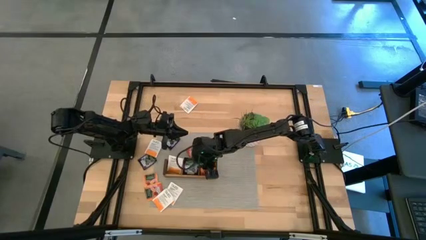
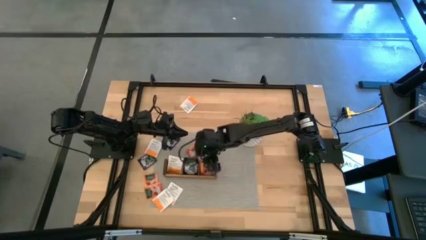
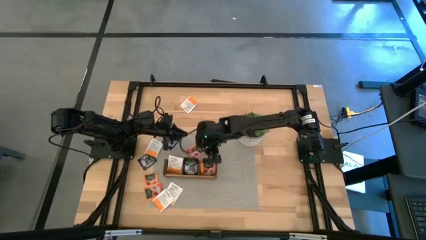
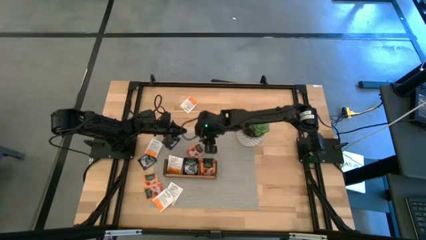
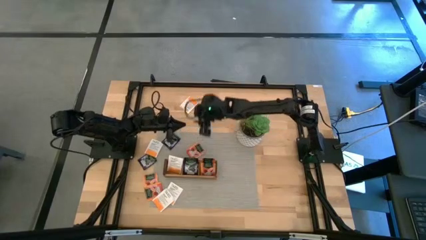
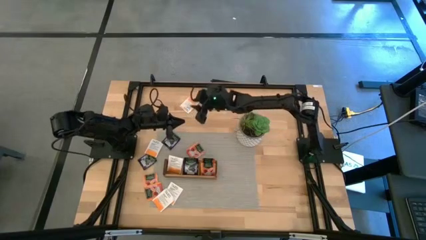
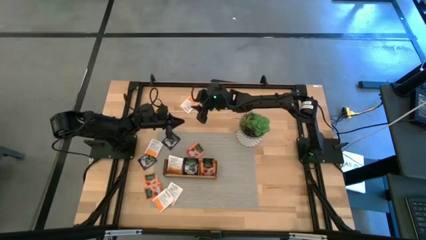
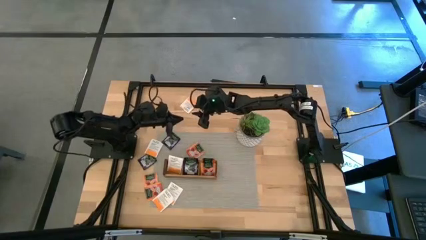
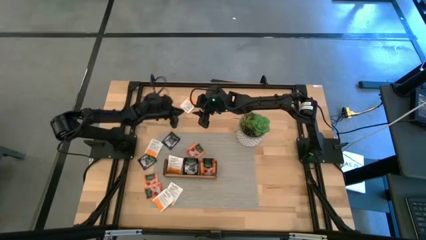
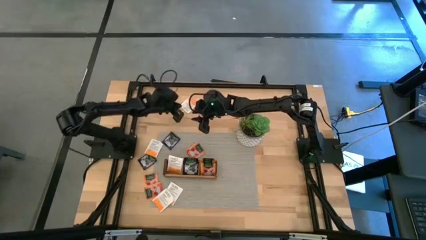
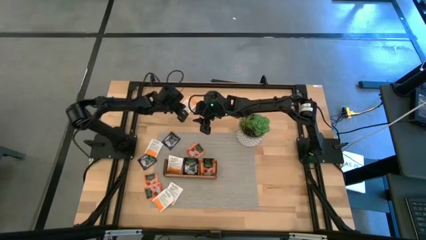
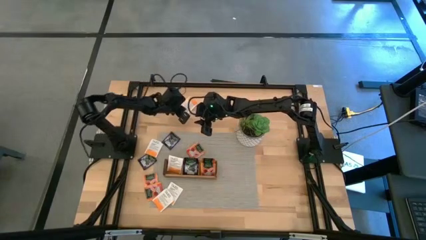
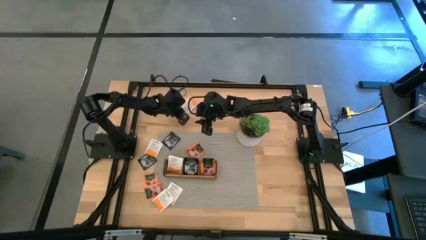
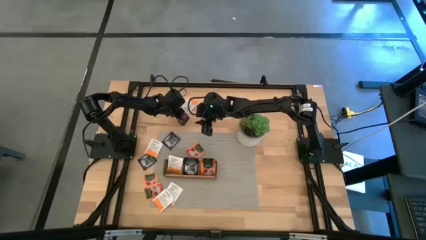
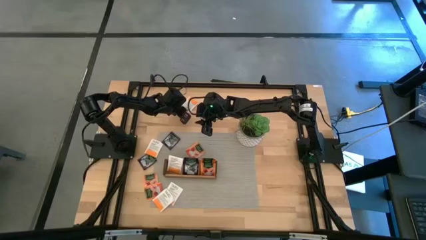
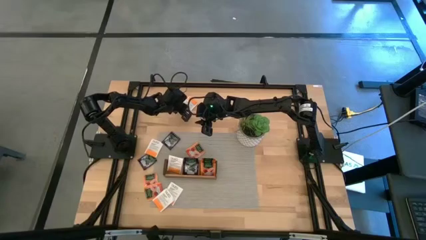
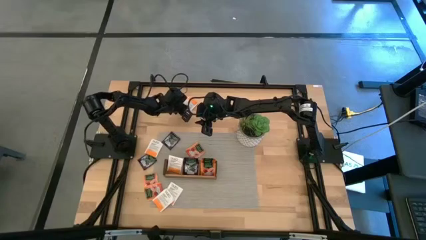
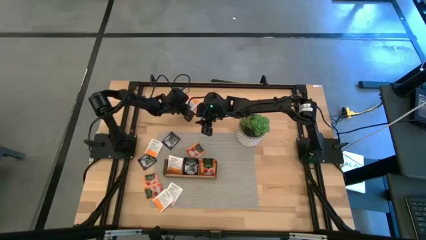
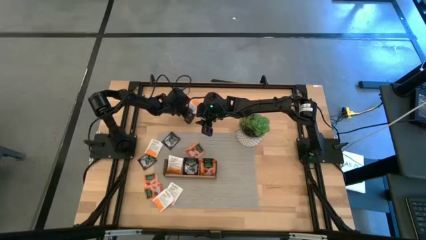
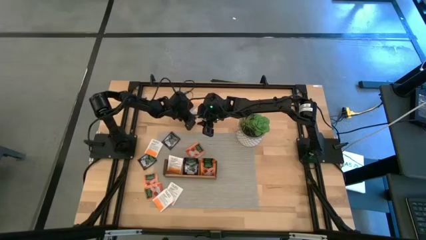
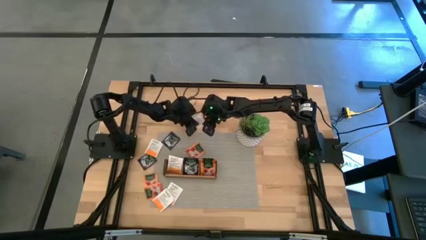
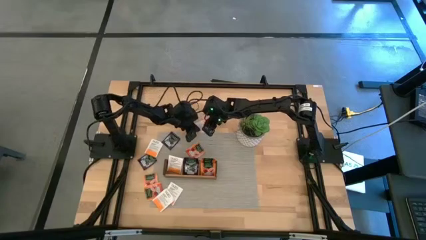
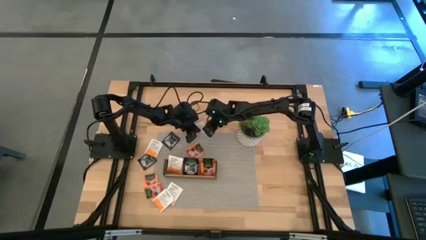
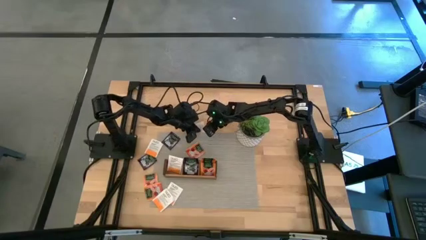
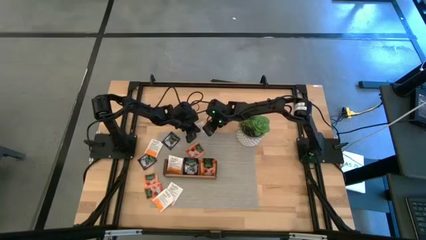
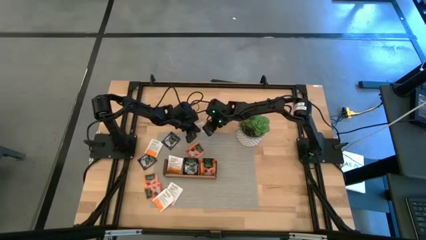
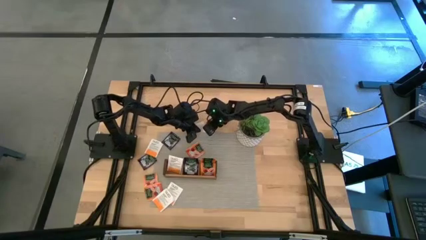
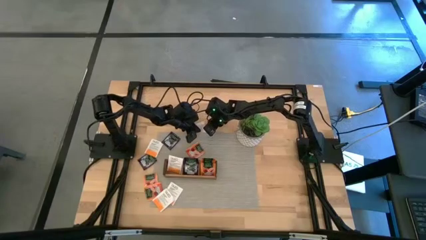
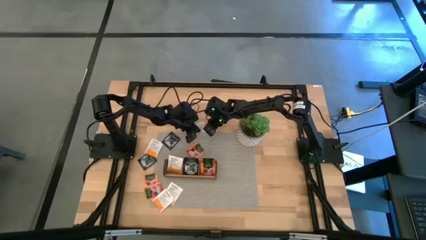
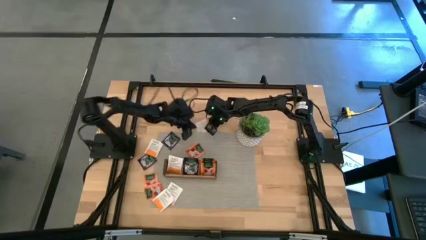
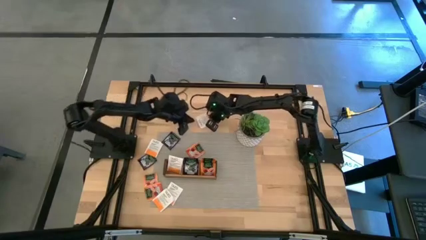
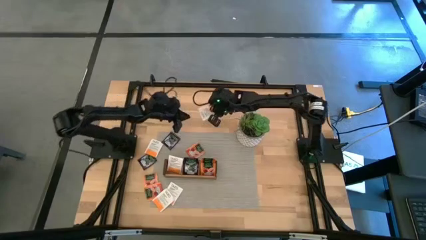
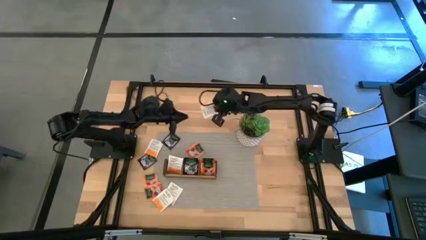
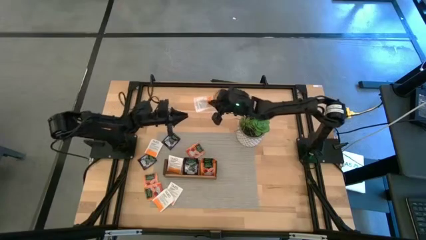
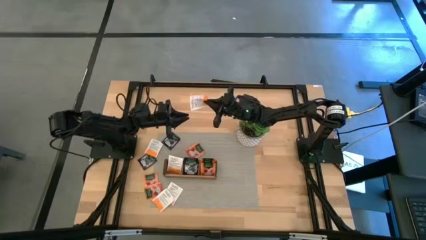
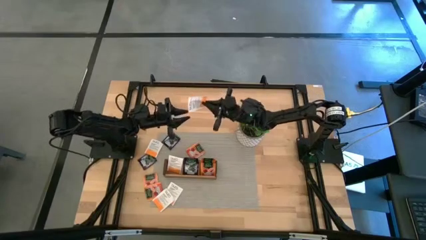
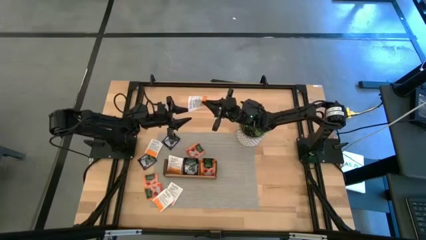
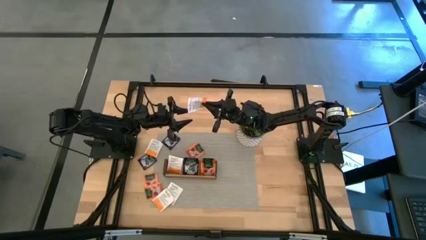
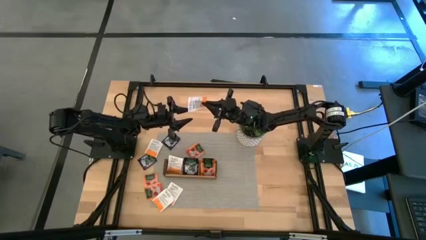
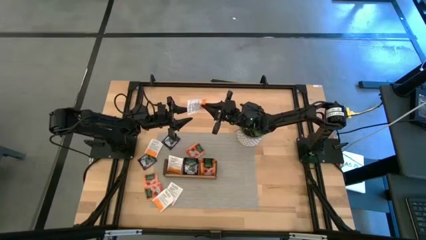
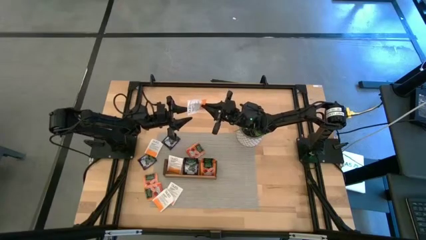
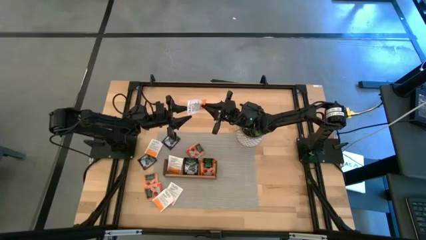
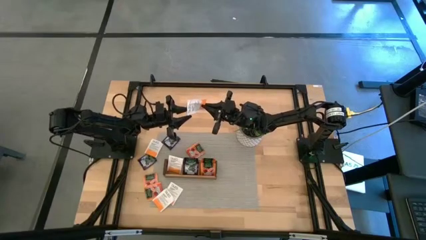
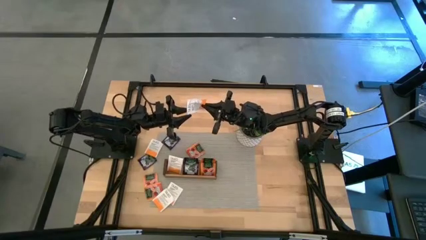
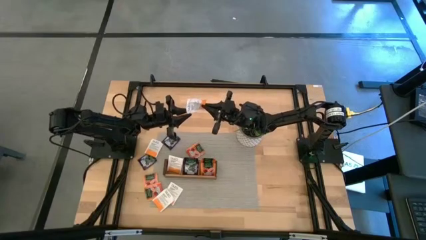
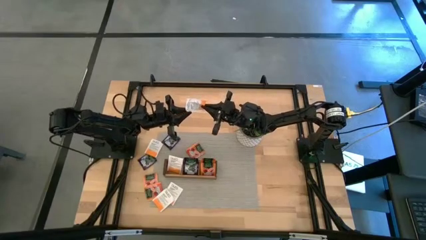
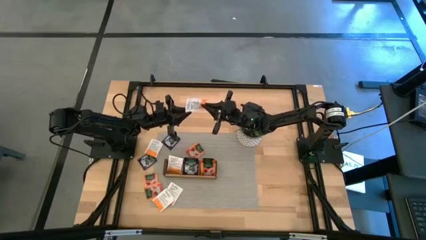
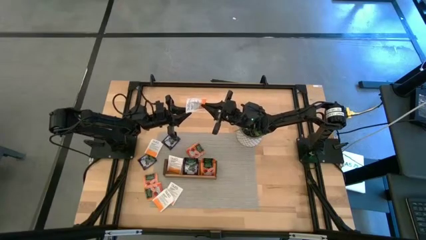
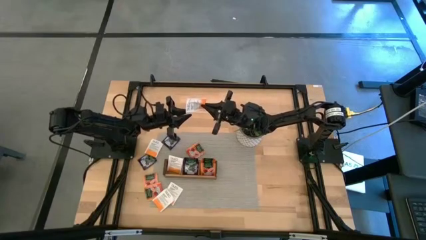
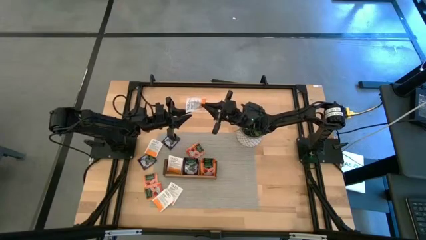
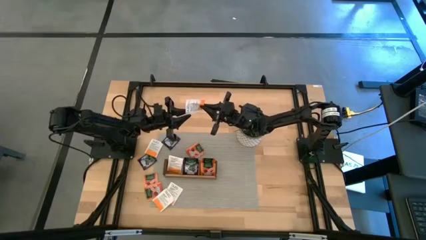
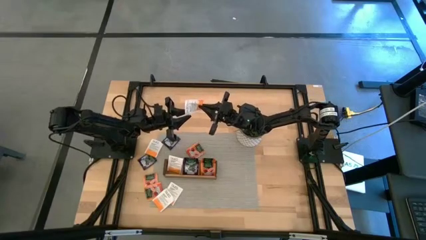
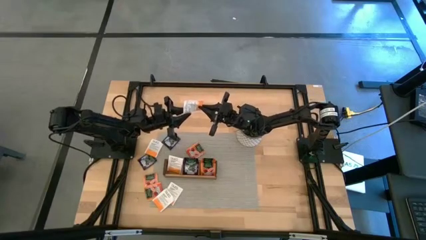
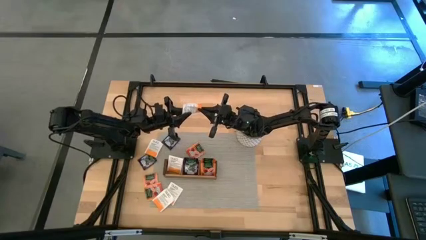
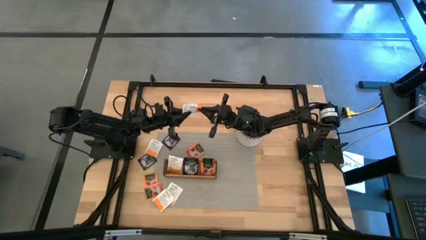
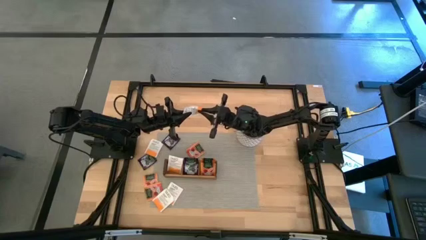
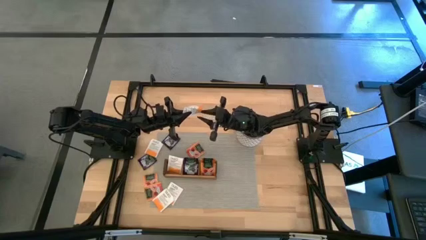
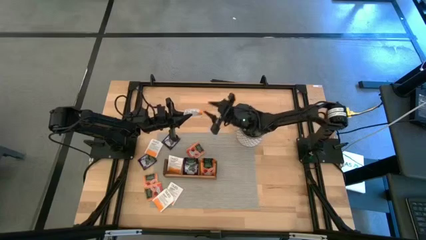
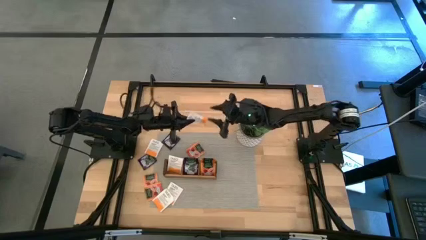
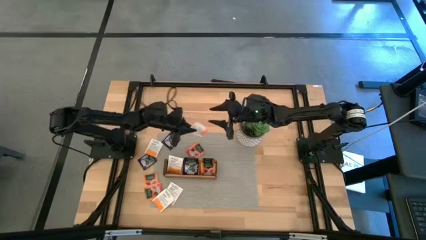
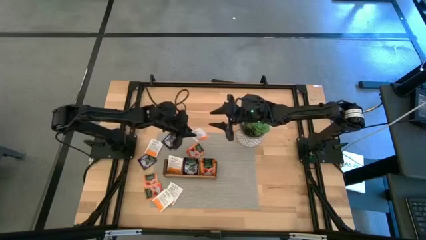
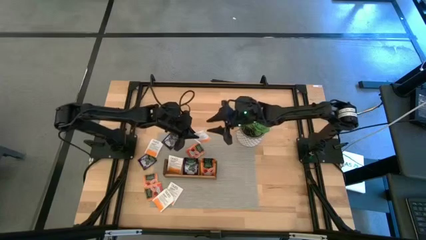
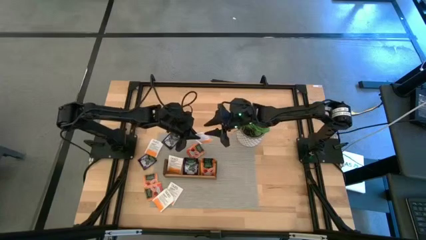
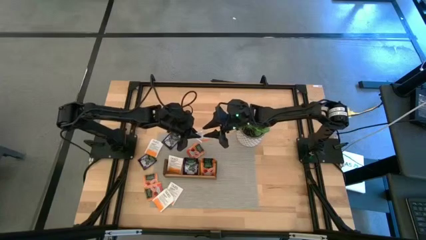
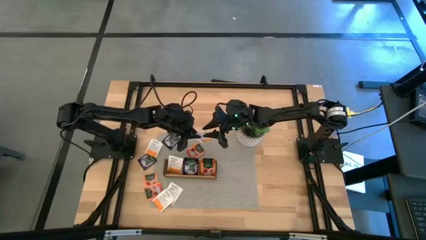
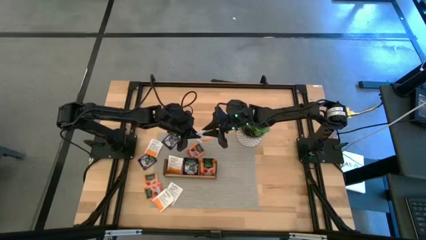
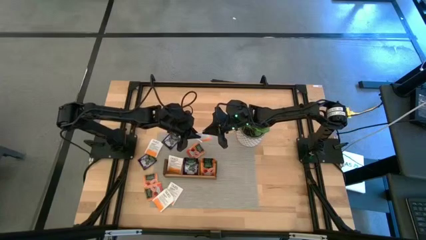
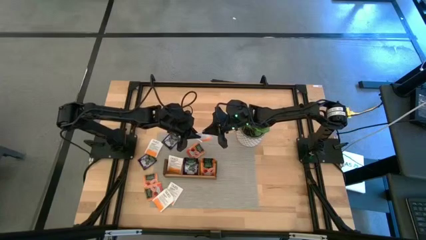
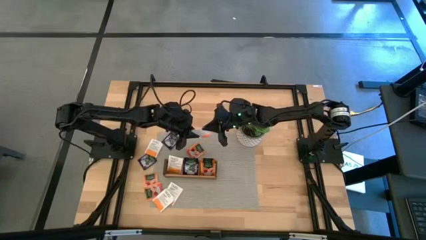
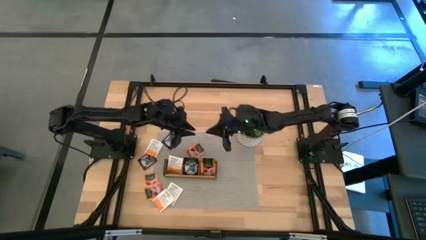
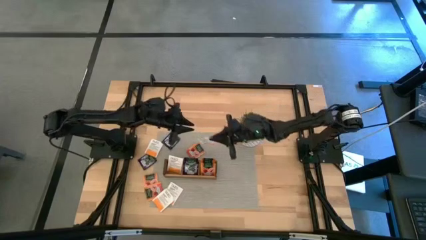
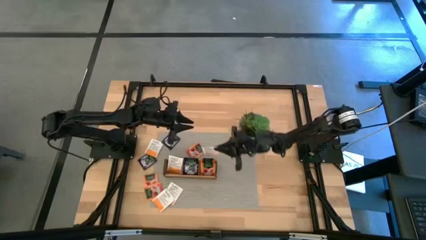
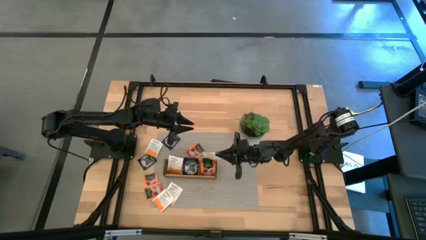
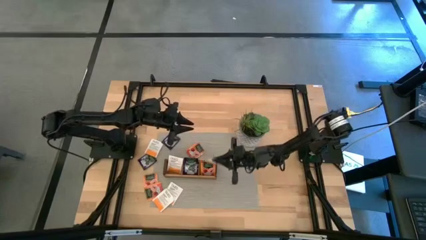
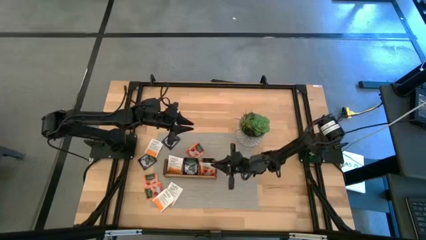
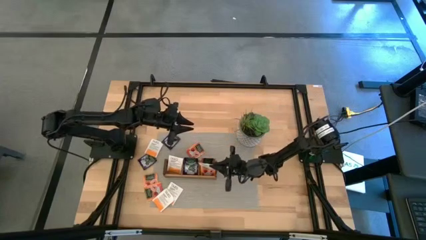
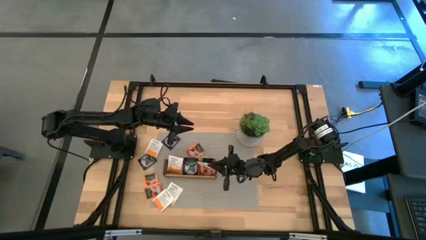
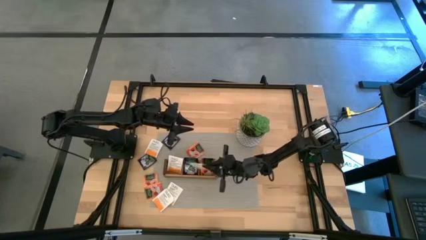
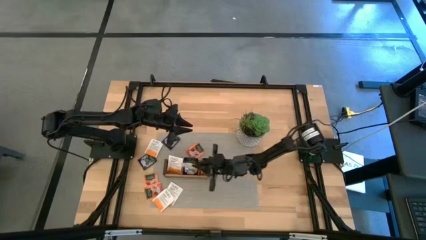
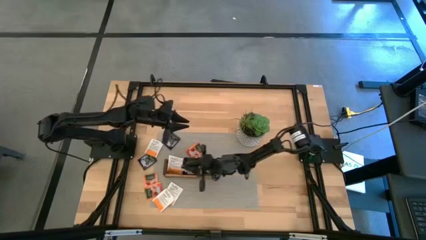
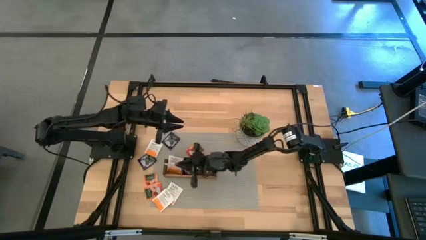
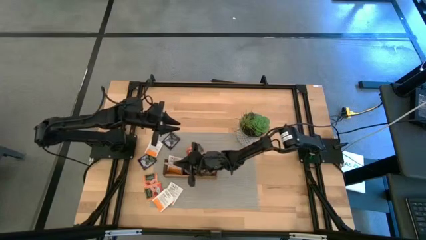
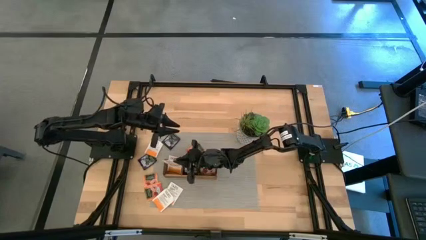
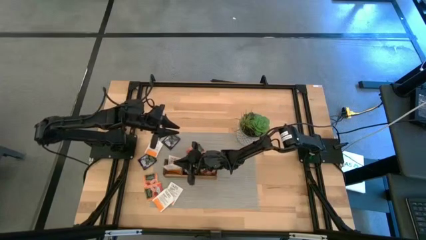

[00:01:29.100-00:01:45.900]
Task: Pick & Place Tea
Put the white tea bag into the left section of the wooden organizer
